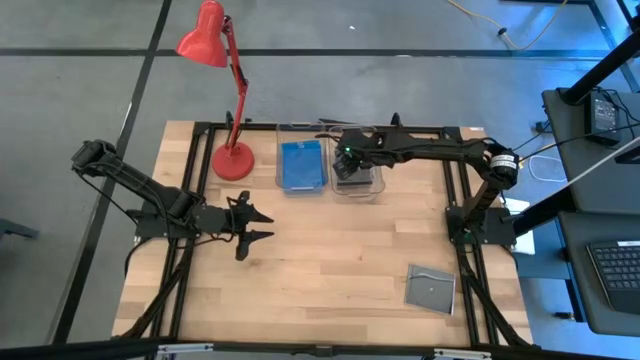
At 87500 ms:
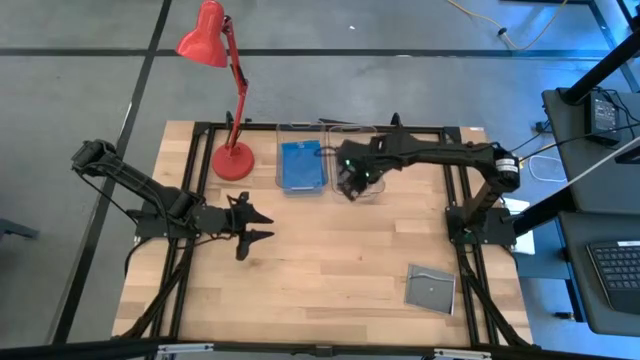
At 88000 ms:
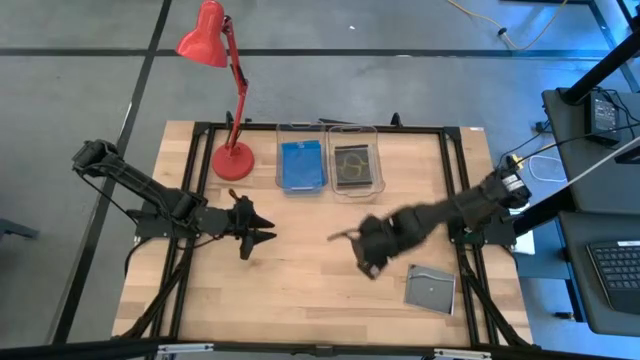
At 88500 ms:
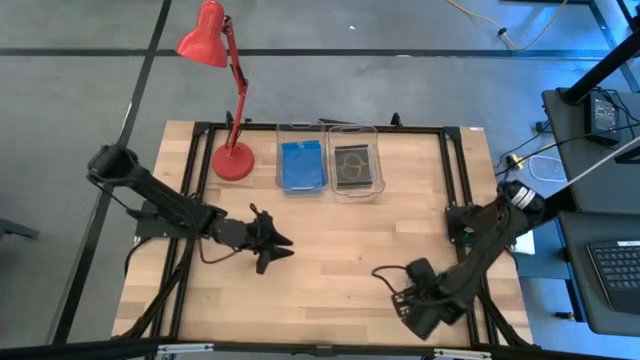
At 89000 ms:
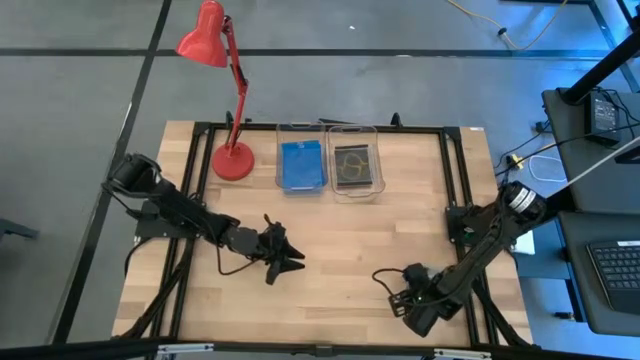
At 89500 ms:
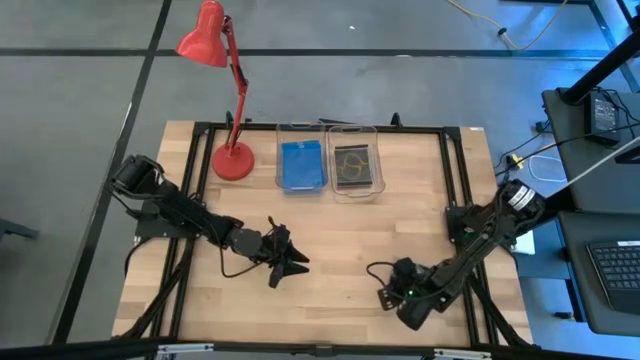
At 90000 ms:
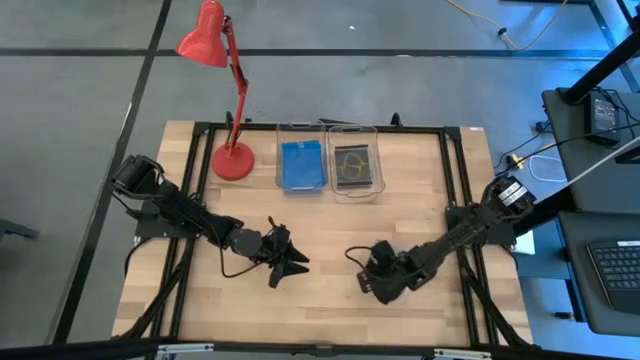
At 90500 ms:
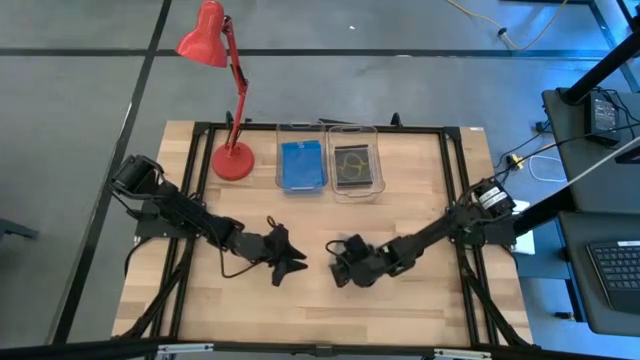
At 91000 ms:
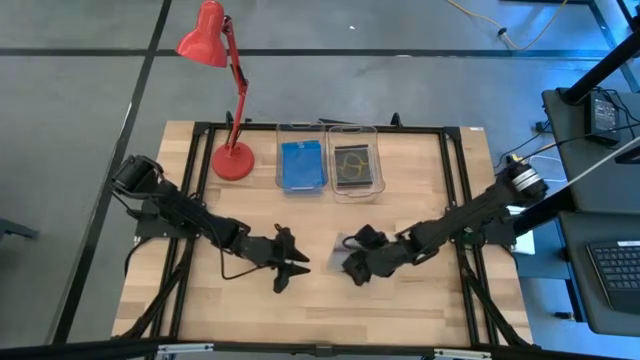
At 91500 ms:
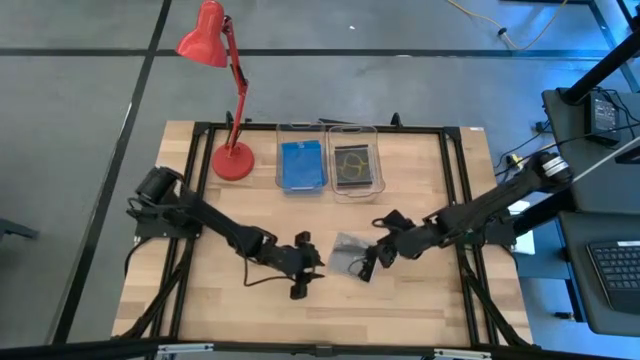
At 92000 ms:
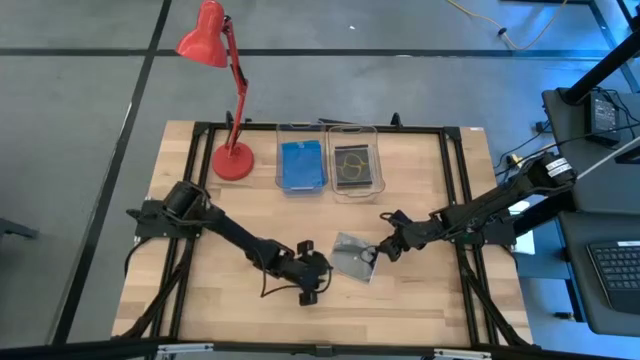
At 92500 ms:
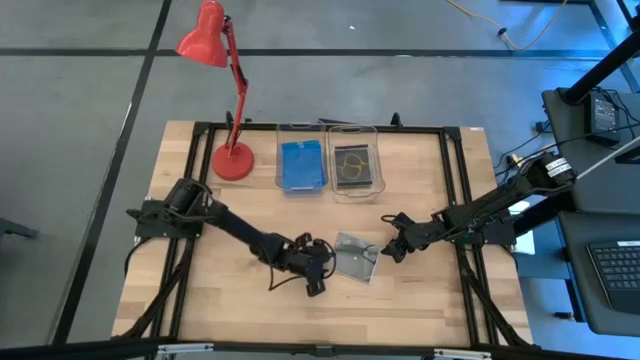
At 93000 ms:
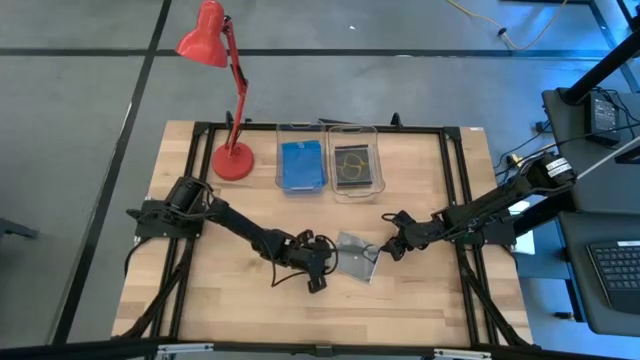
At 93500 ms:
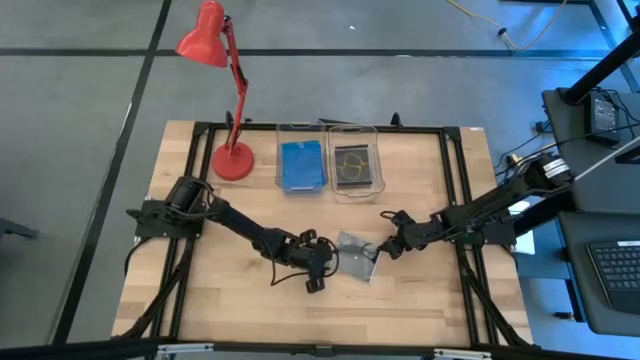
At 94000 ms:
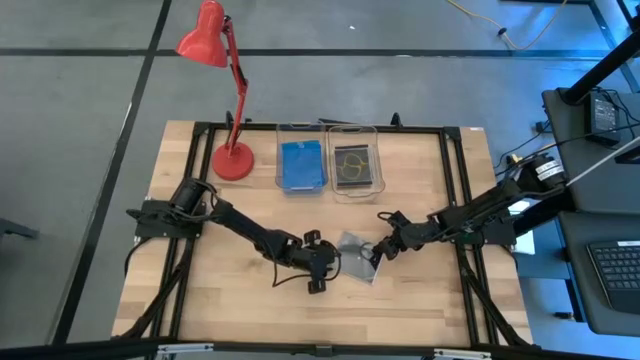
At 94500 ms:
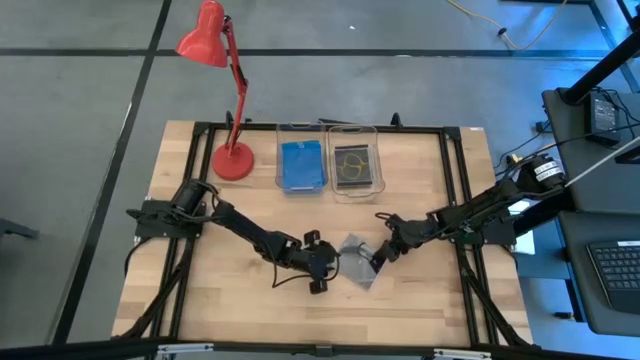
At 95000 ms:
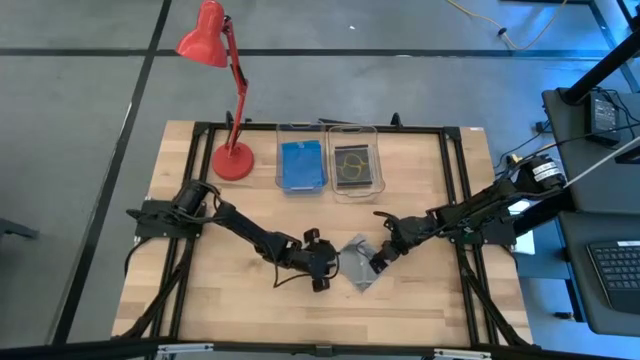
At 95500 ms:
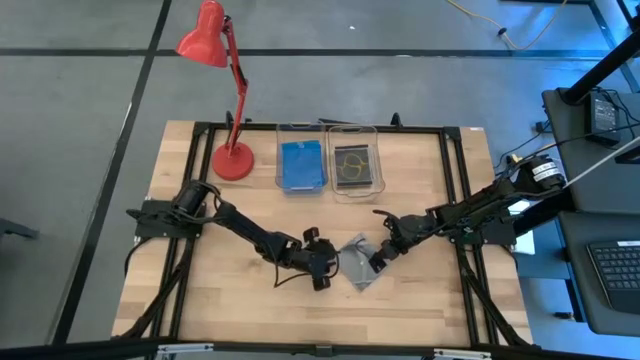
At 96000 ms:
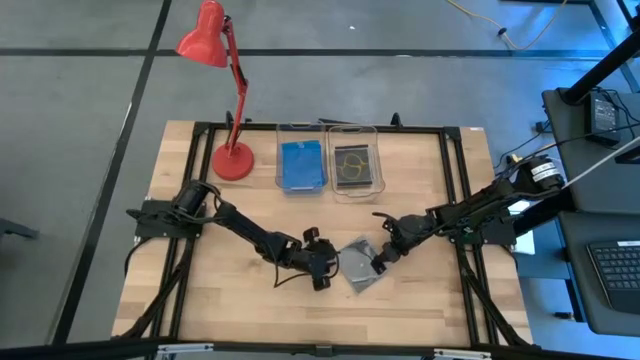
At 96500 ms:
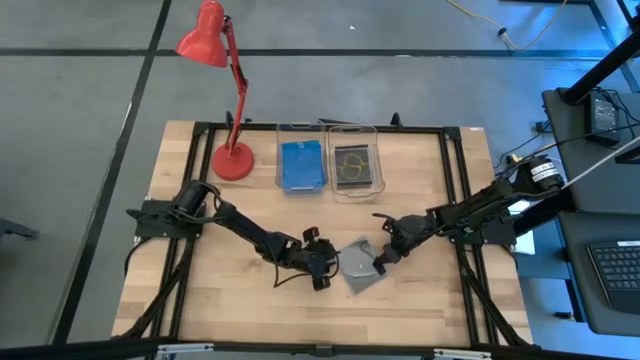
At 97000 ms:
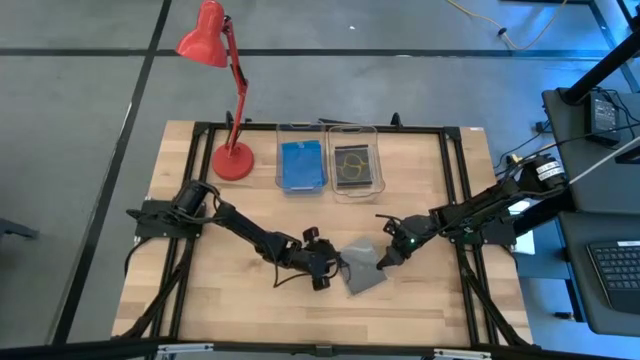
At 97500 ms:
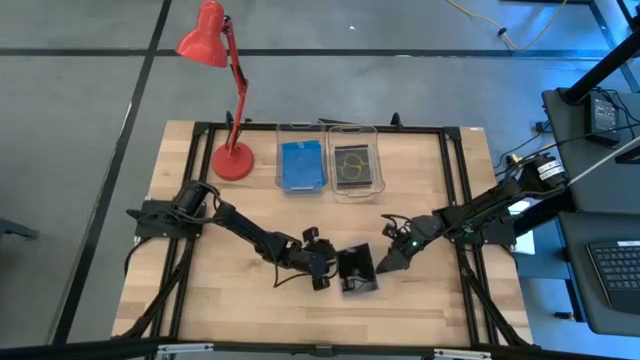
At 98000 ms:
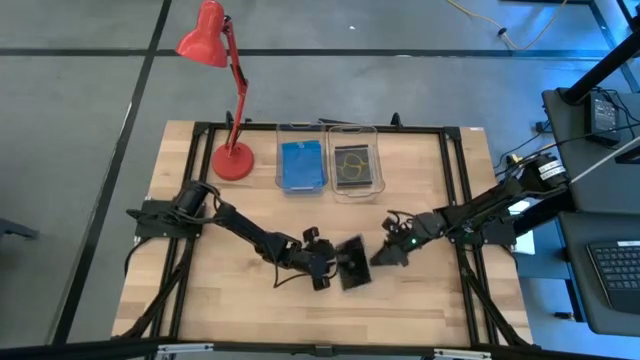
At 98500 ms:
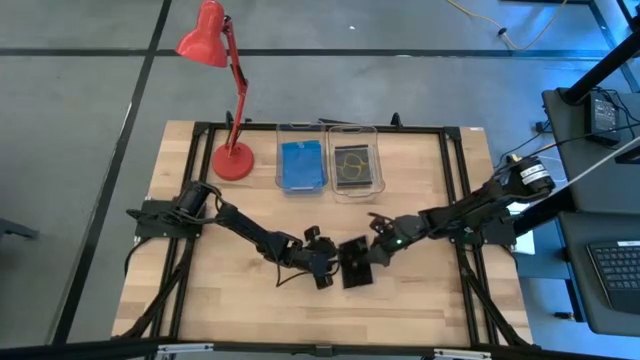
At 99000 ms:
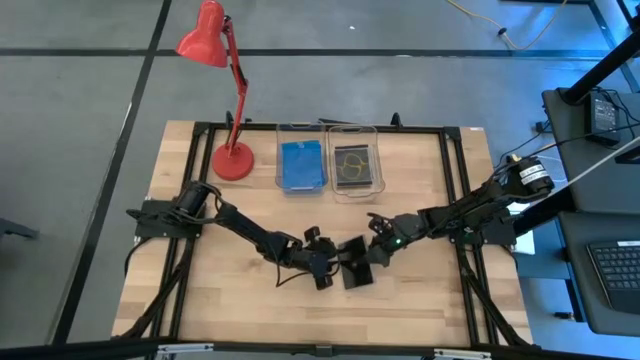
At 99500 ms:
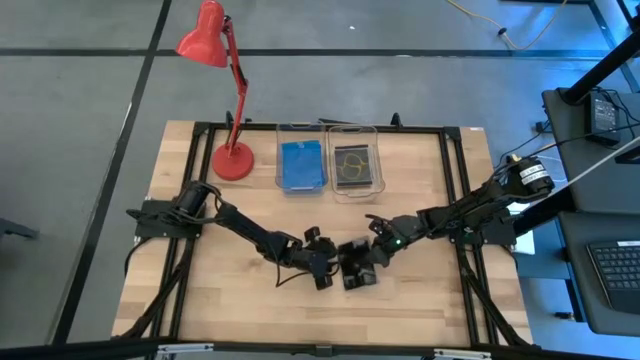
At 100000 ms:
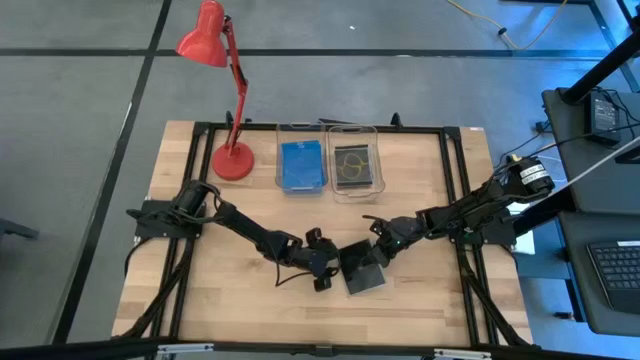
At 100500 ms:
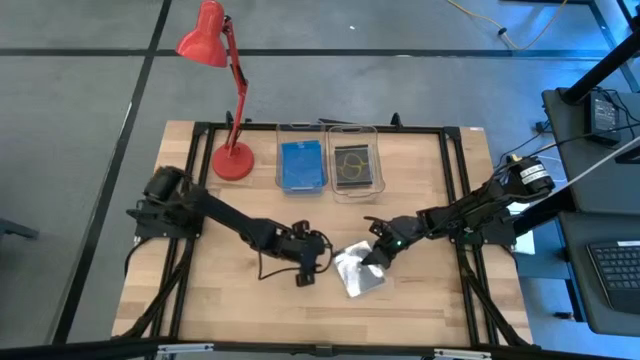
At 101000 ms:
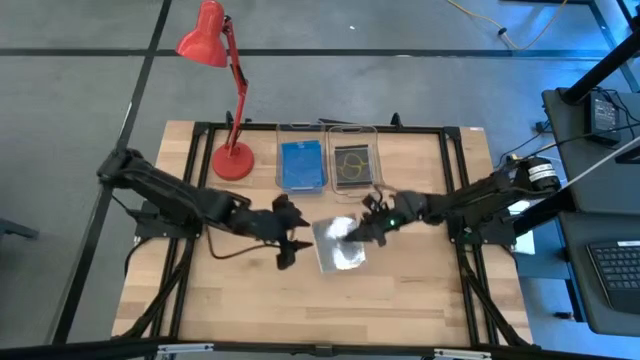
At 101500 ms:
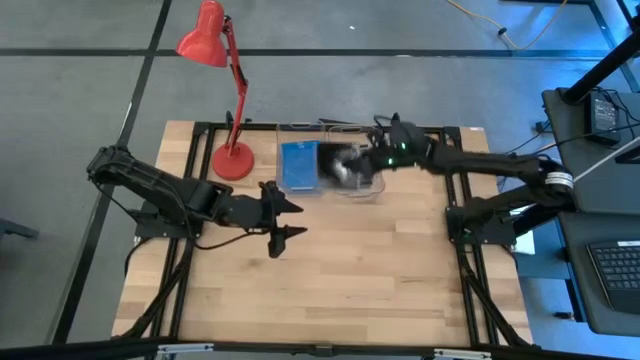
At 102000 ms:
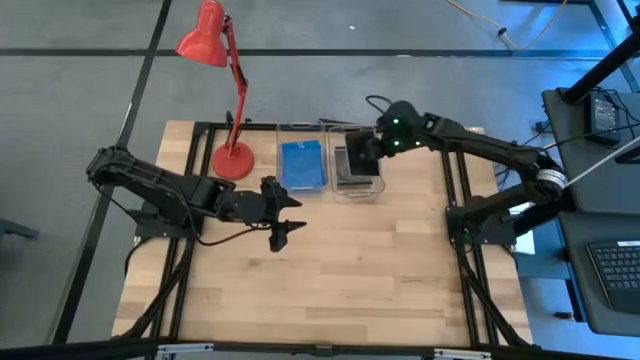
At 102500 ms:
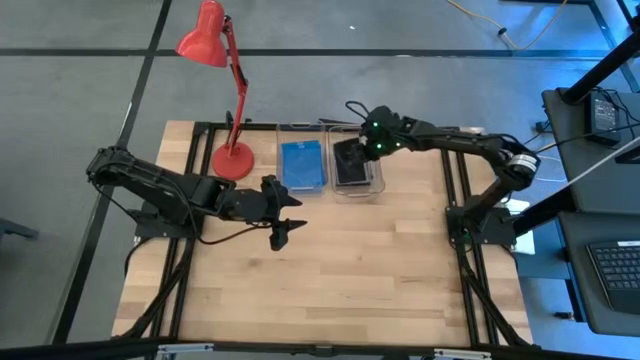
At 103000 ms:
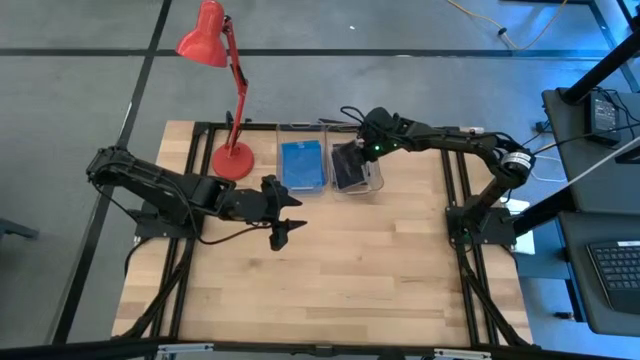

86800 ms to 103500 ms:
Task: Pick & place jewel cases by type
Put the black CD case into the right transparent bin

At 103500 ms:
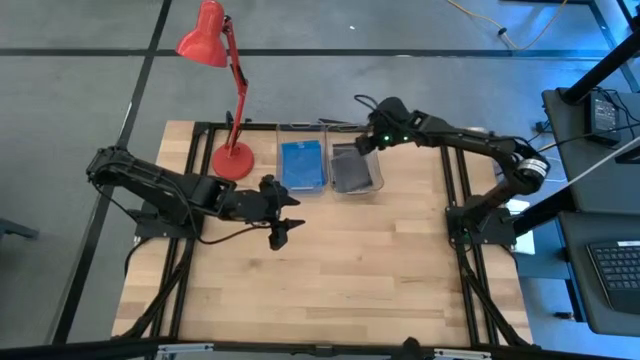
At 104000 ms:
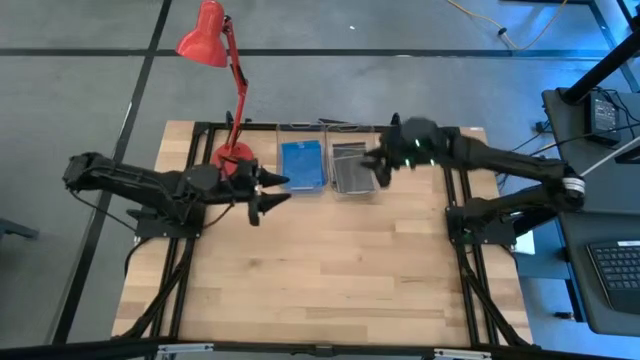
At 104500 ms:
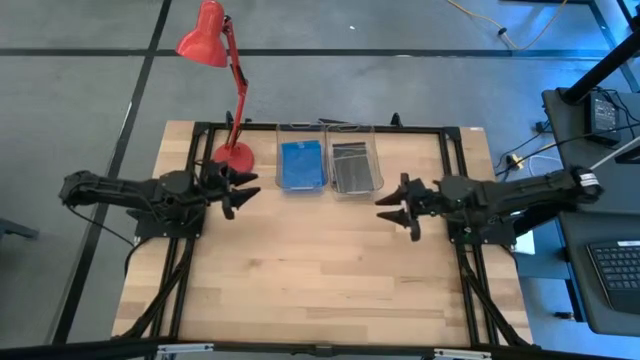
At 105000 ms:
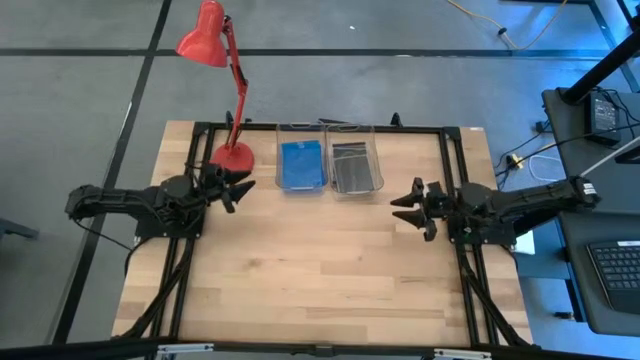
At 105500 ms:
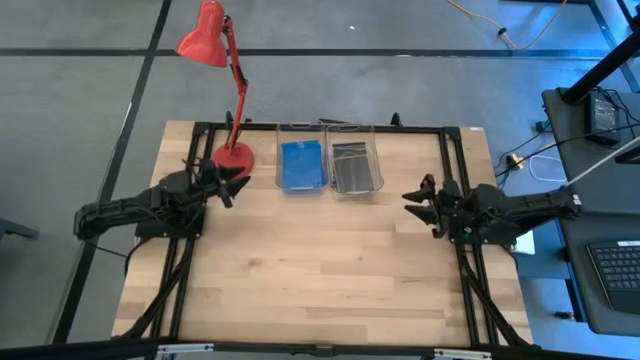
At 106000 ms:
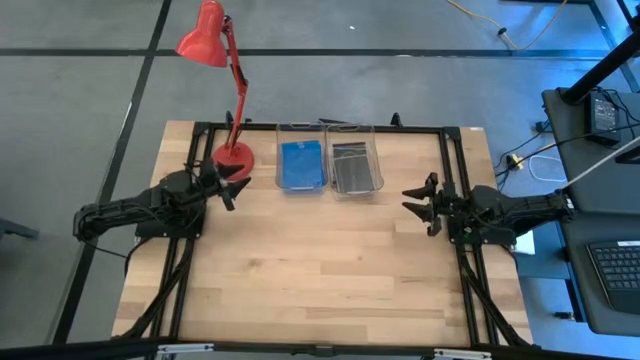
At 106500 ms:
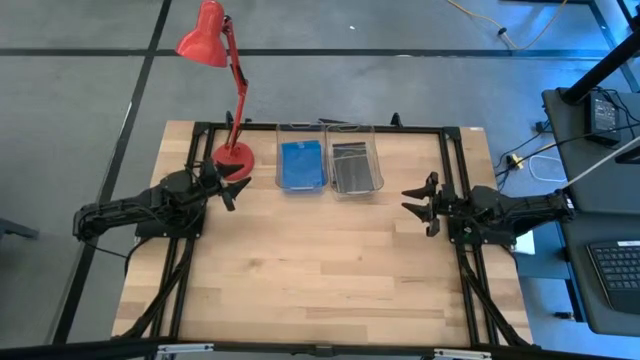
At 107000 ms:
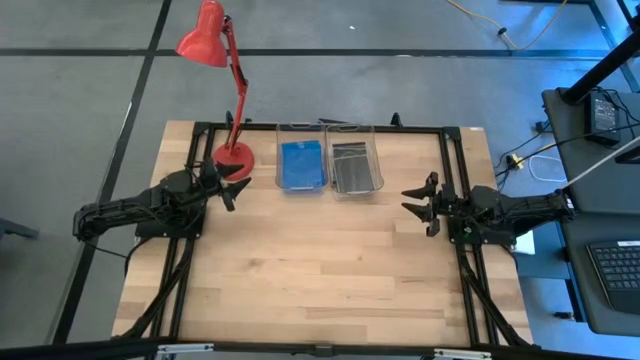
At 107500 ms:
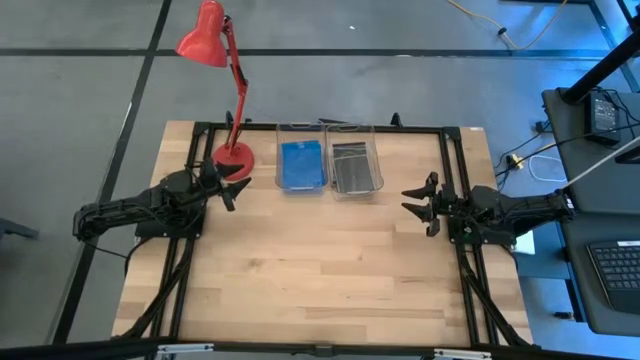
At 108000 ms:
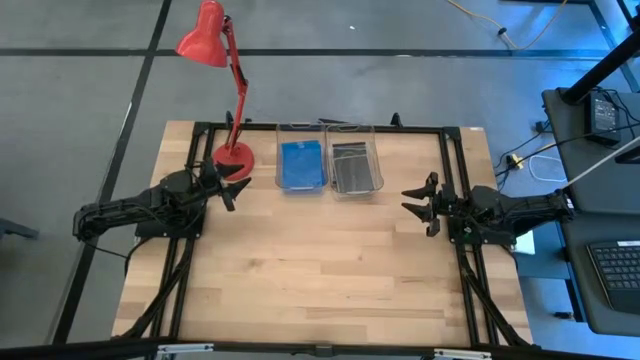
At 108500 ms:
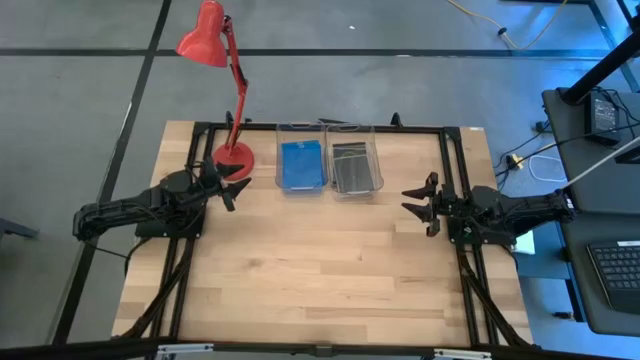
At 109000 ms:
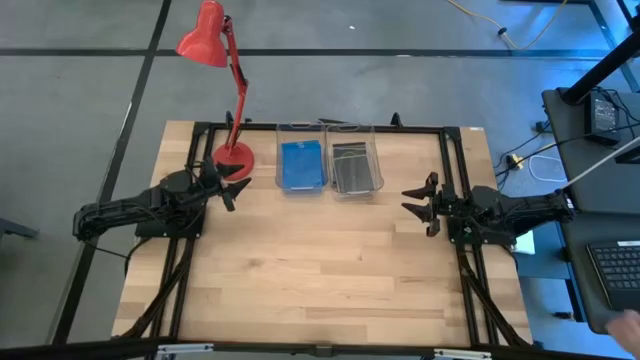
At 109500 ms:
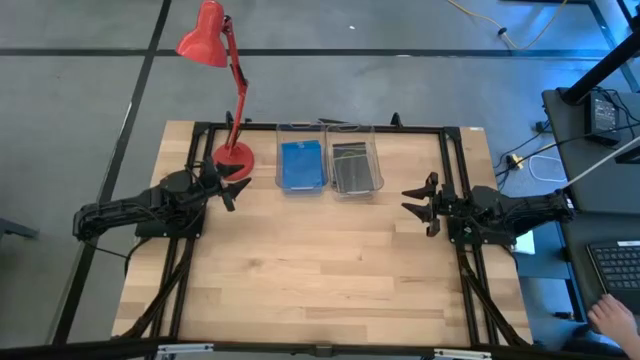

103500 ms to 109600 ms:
Return to Home Position
